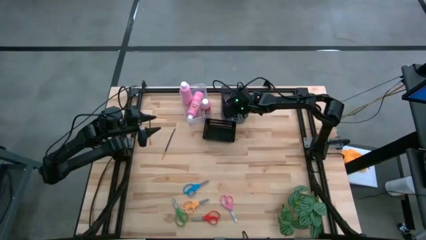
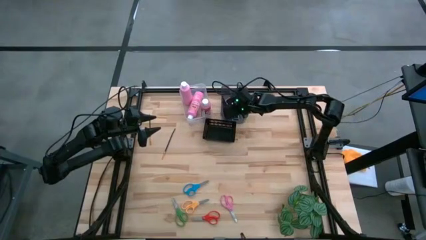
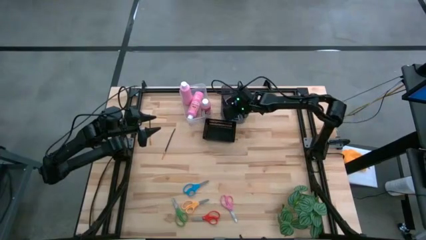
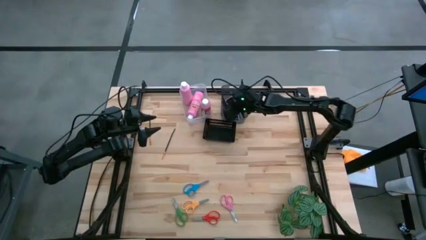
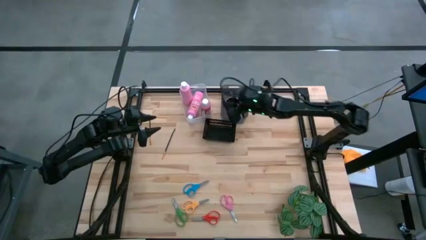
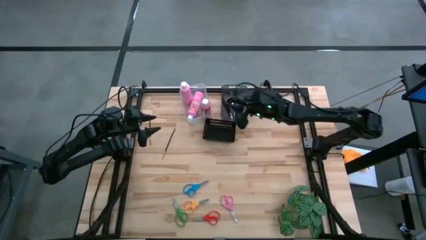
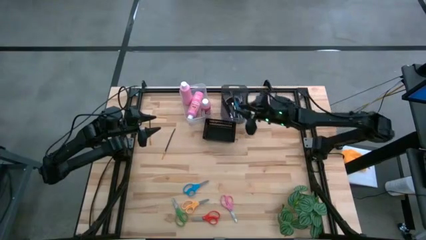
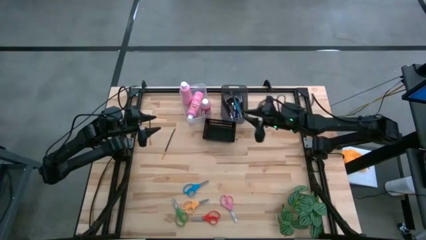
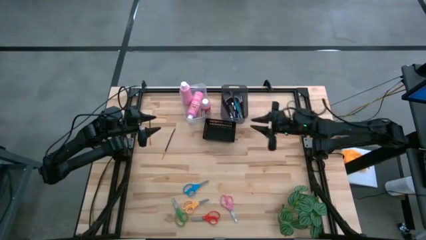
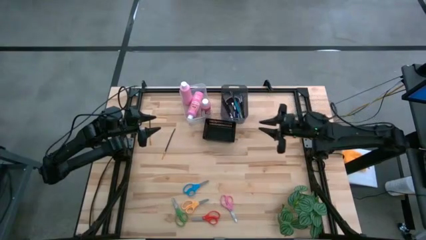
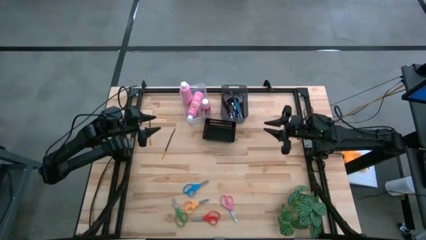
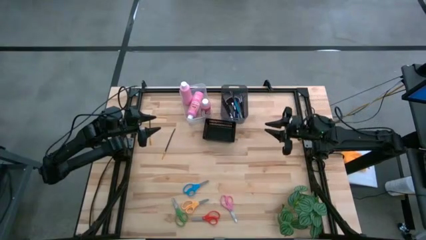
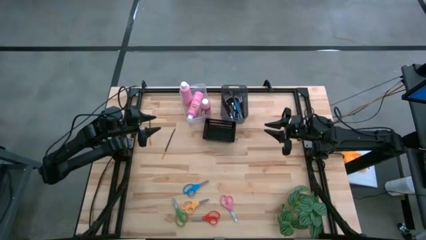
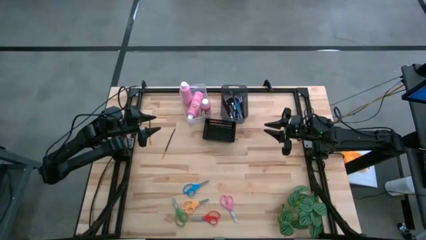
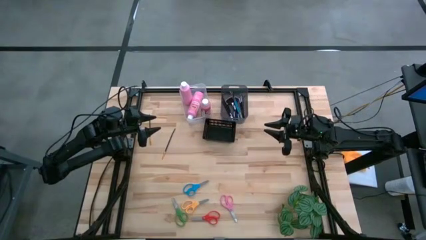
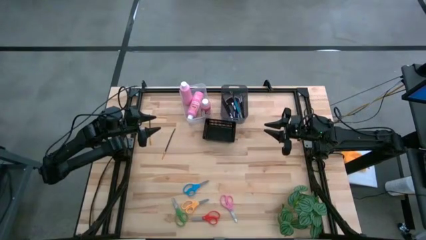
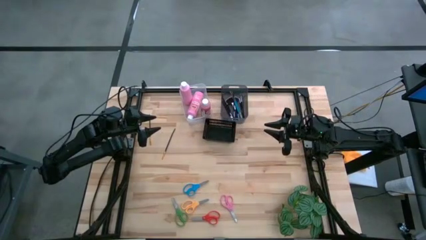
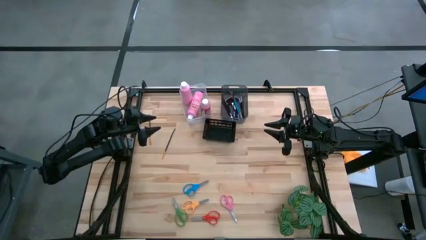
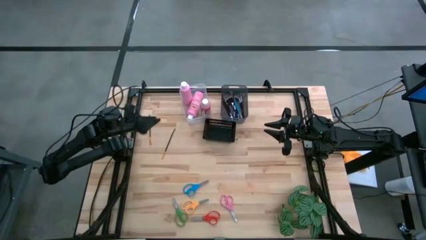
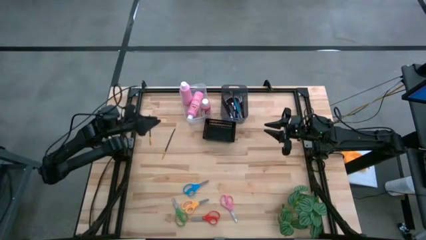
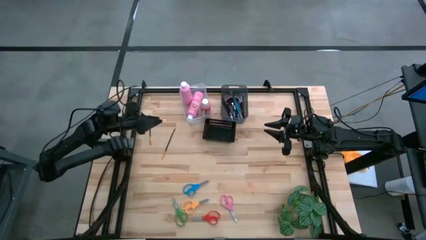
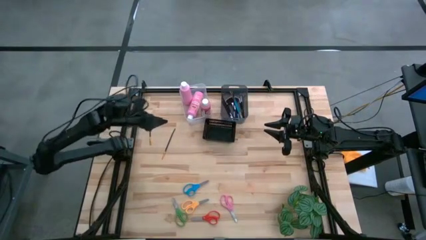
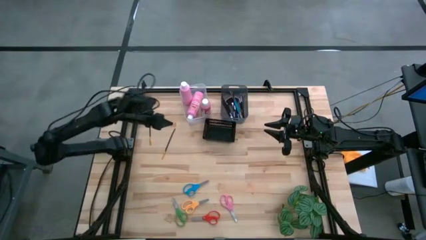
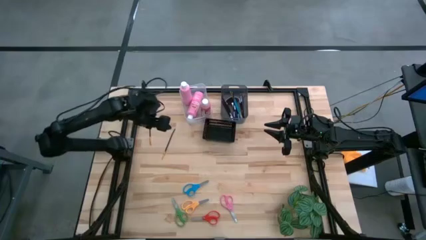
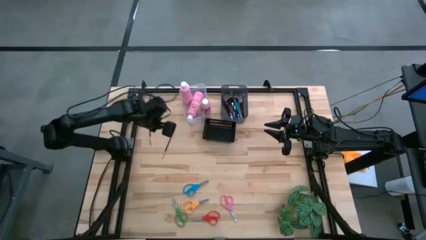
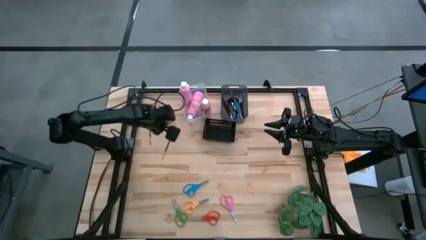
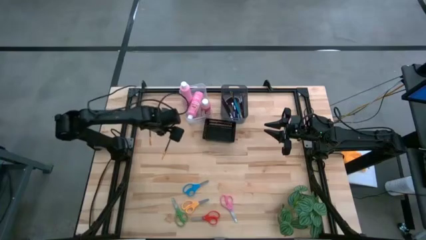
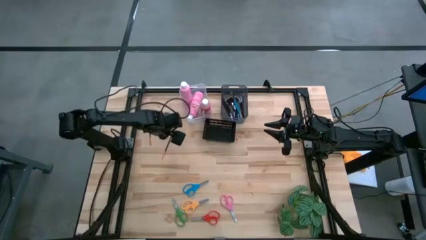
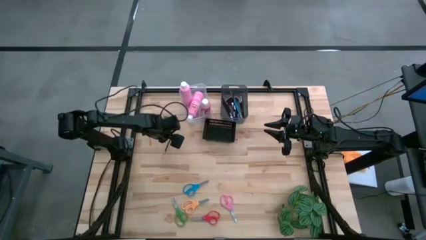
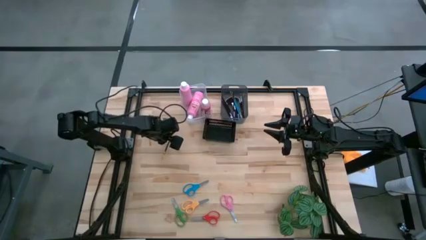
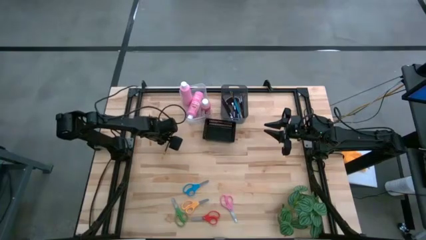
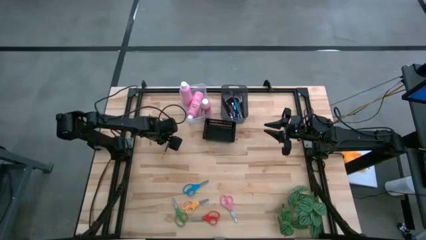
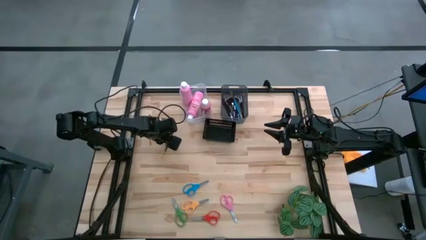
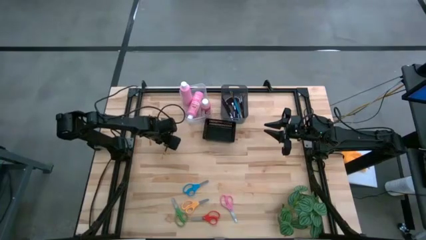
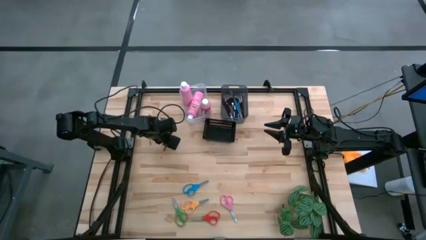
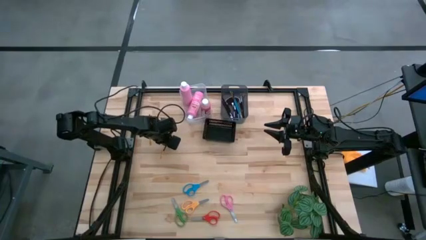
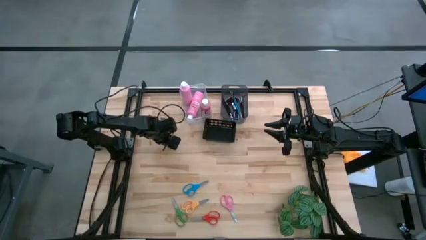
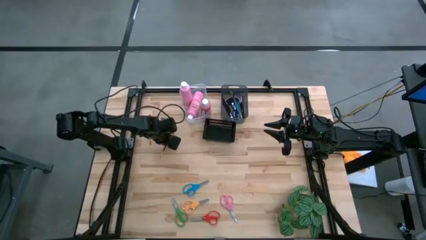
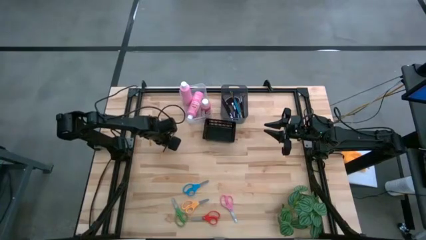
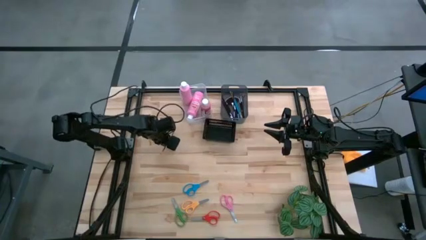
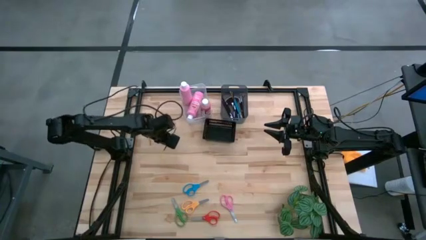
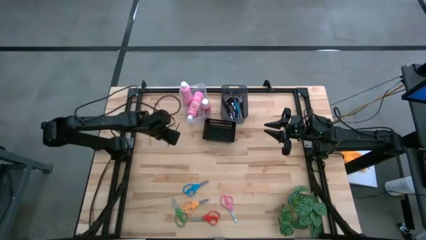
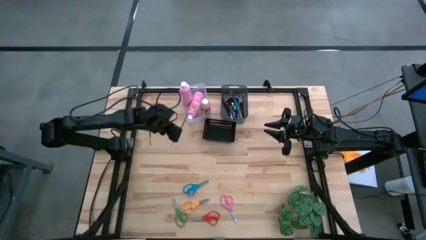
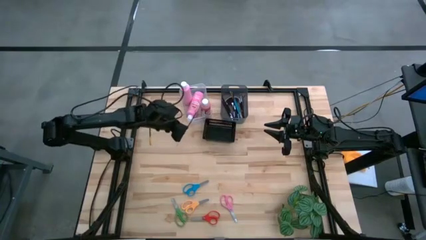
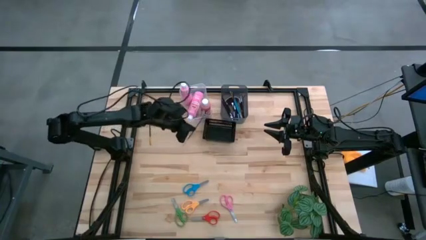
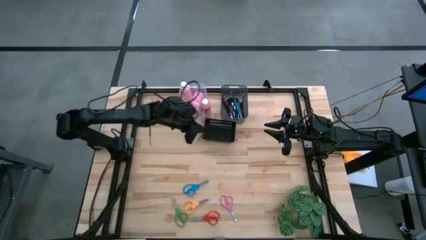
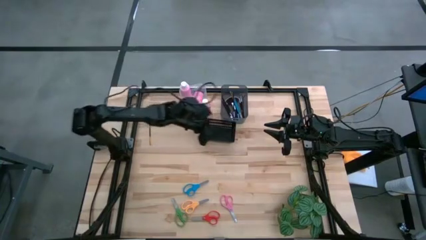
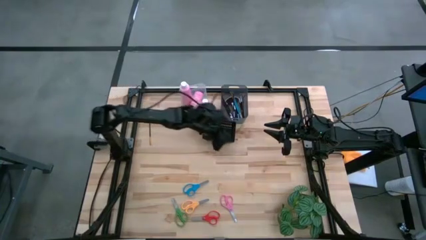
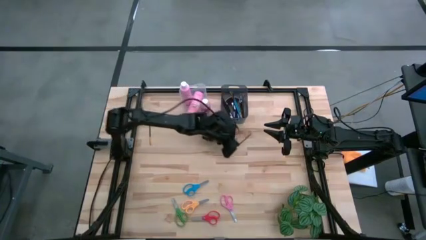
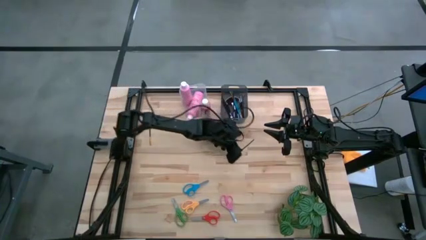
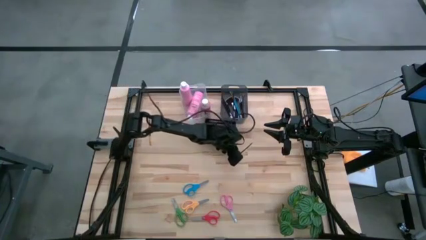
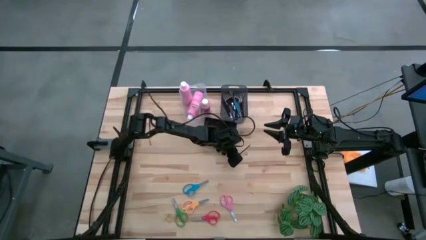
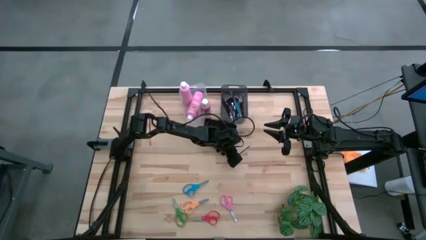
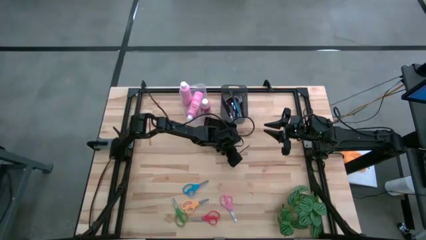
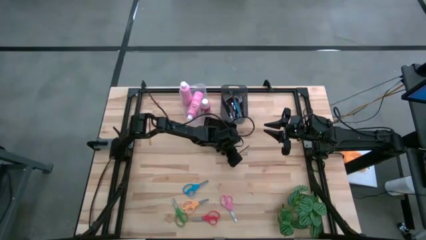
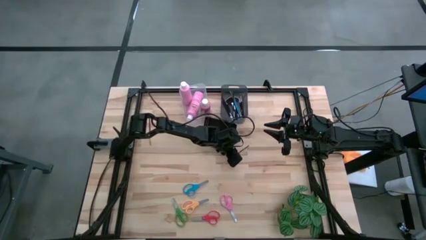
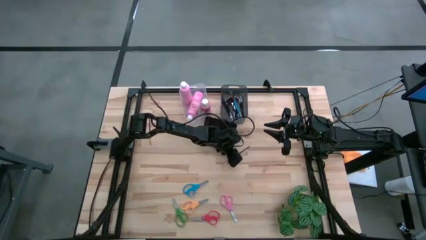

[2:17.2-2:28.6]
Task: Pick & Place Paint Supplies
Put the black paint brush into the gray bin

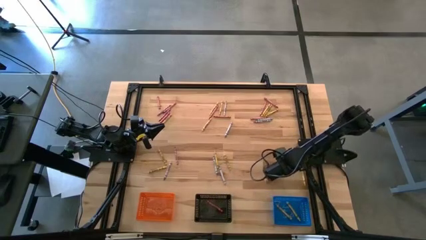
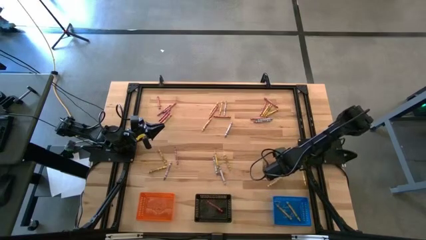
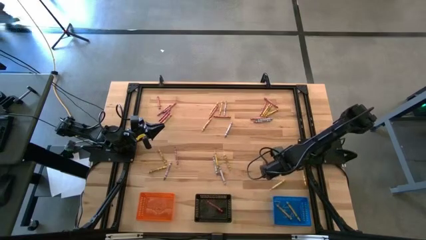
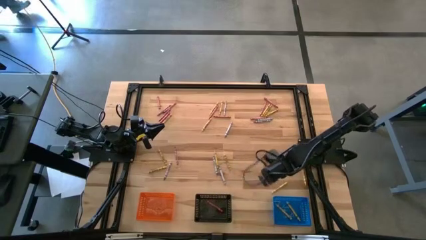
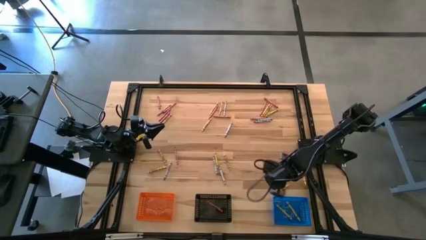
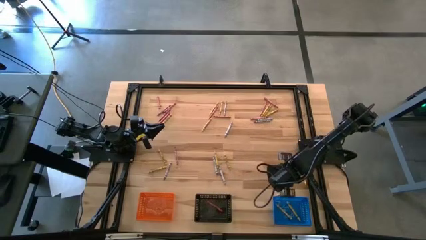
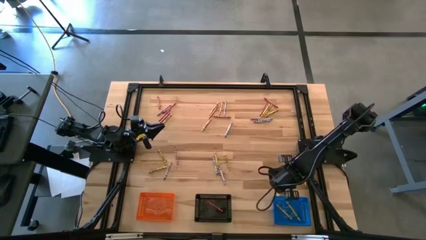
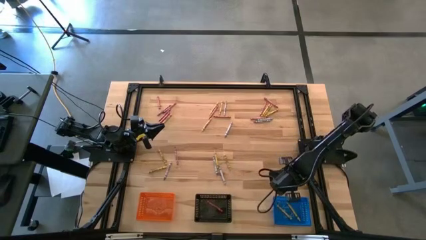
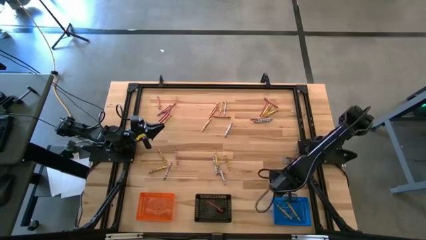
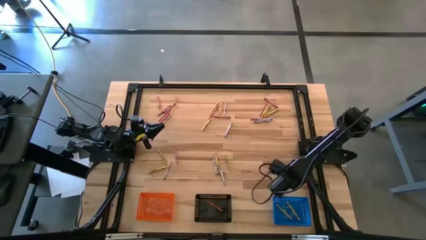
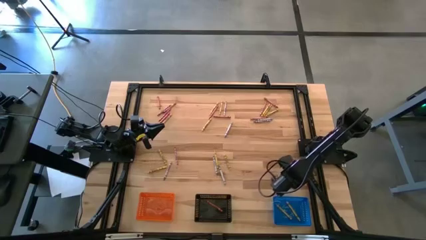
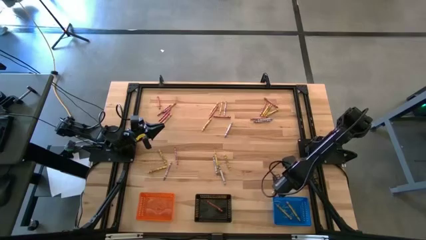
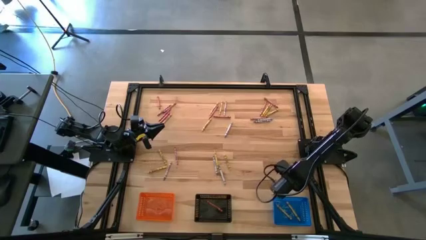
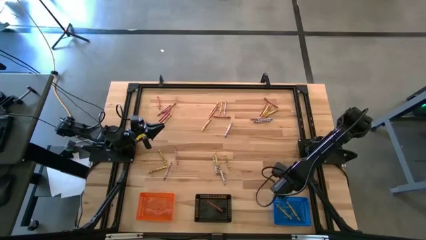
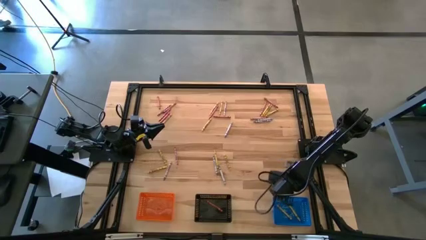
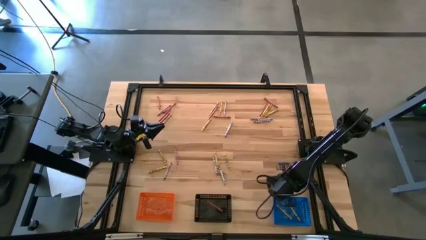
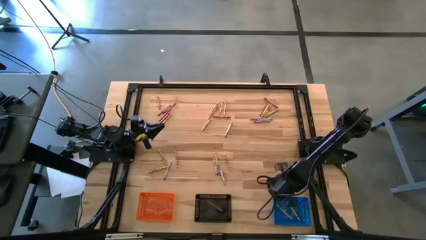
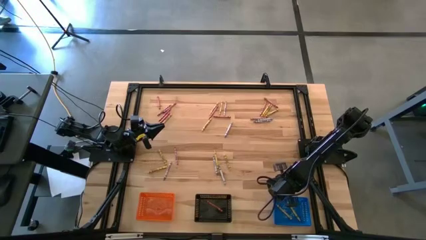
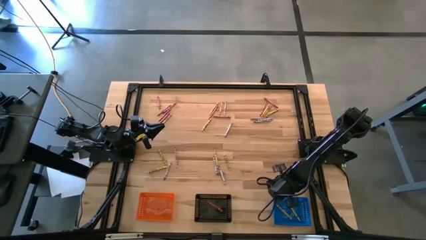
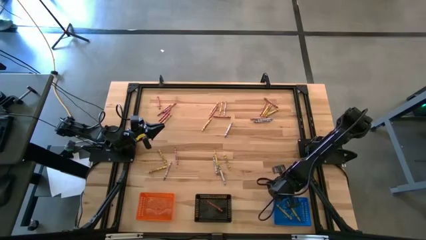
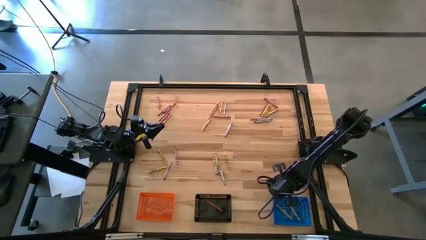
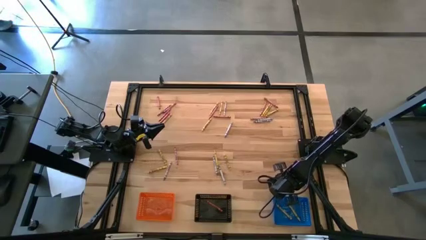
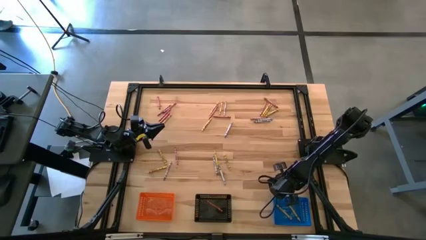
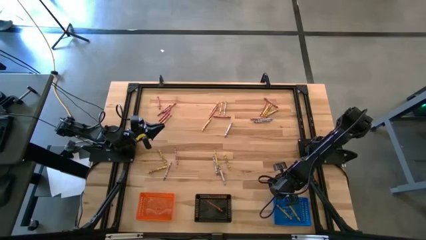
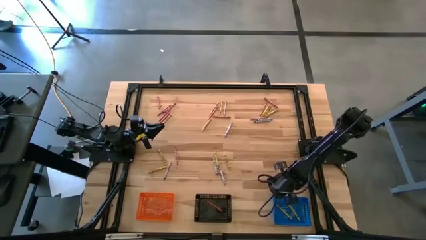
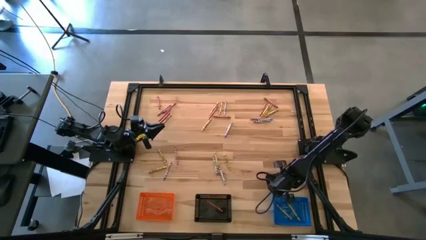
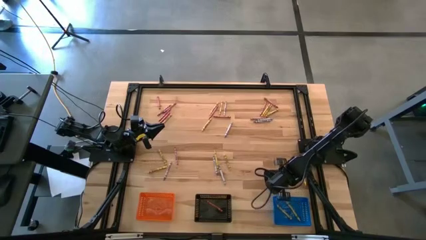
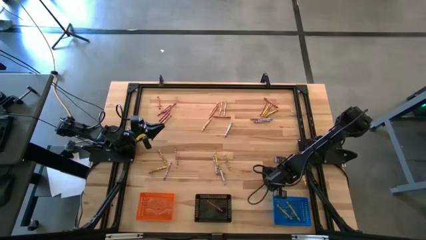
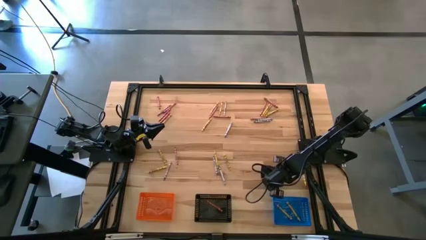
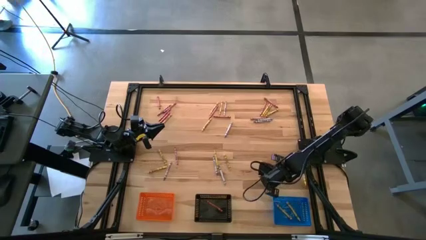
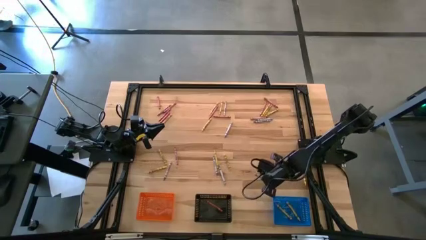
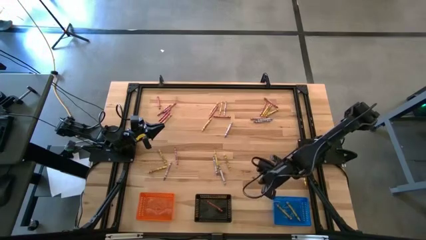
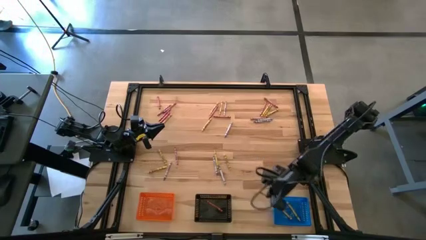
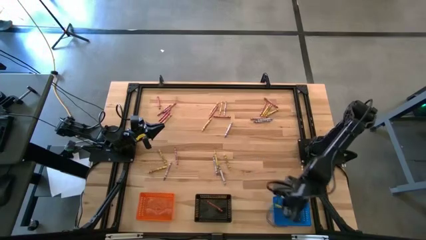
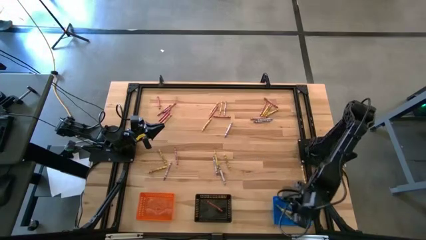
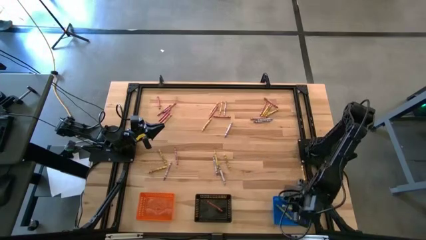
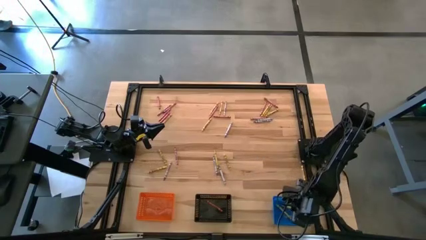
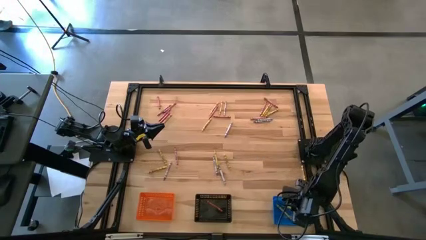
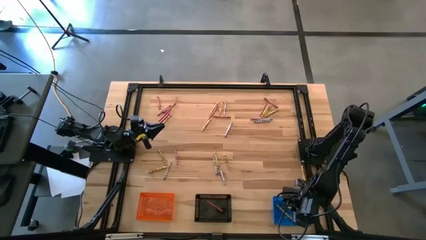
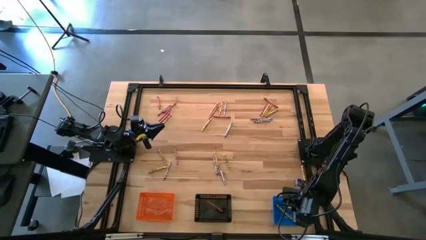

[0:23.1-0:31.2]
Task: Sort crayons
Put the yellow crayon into the blue bin
